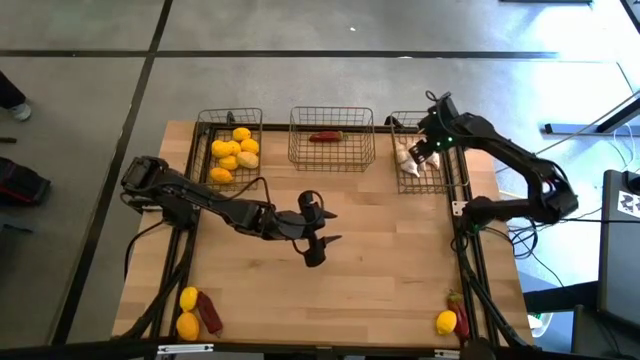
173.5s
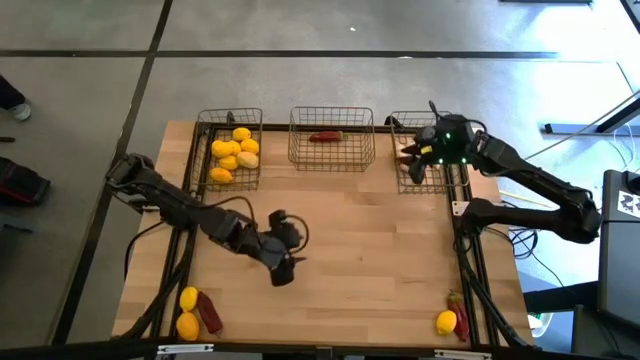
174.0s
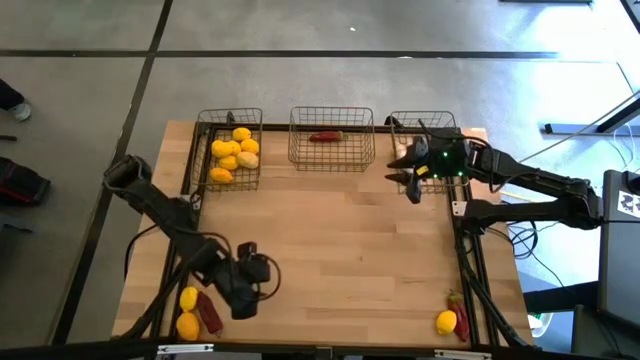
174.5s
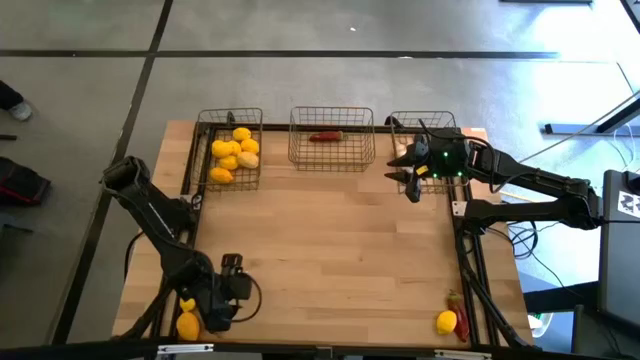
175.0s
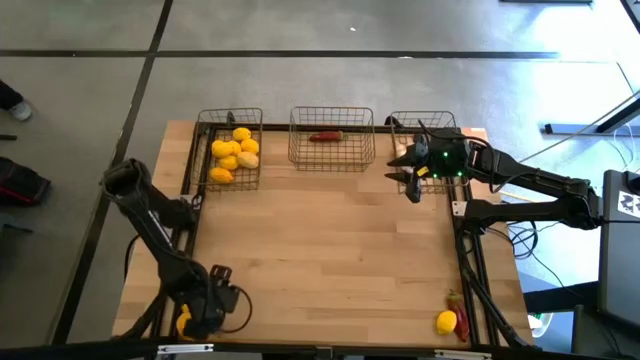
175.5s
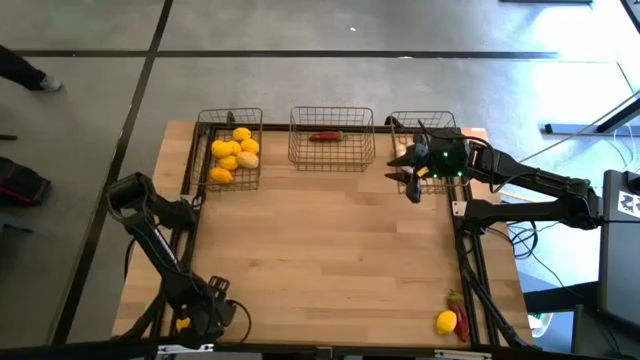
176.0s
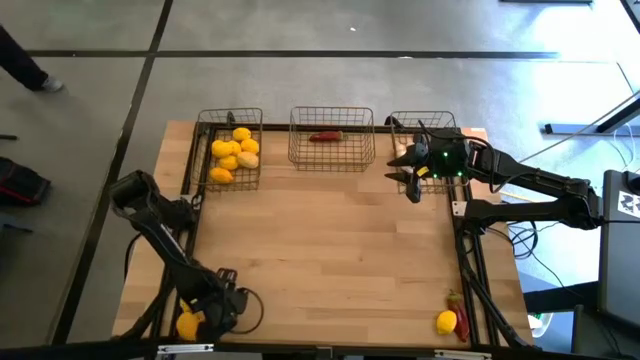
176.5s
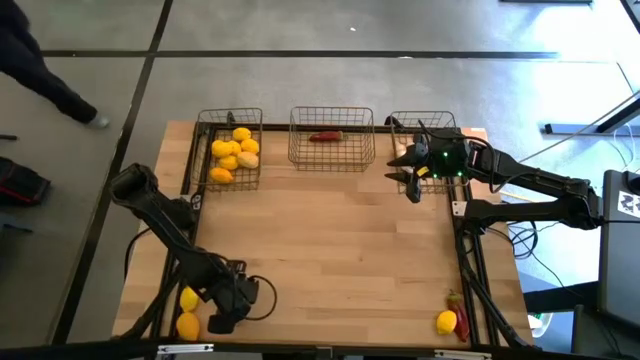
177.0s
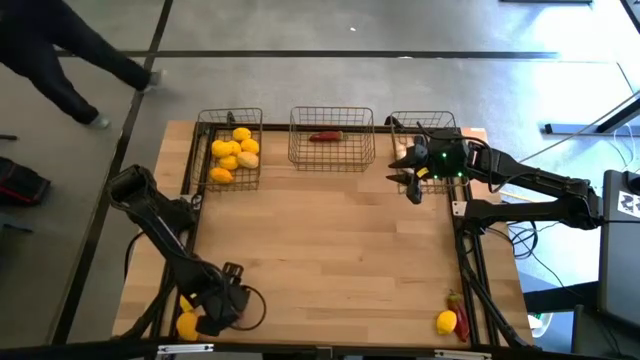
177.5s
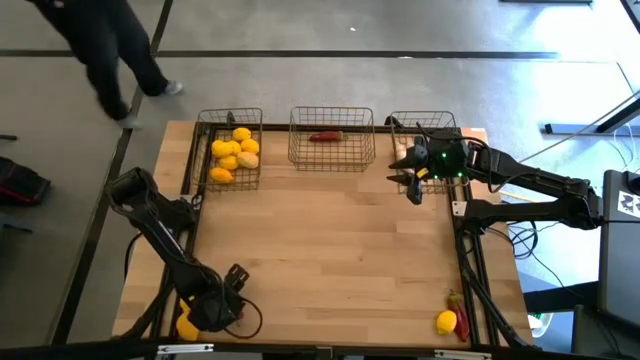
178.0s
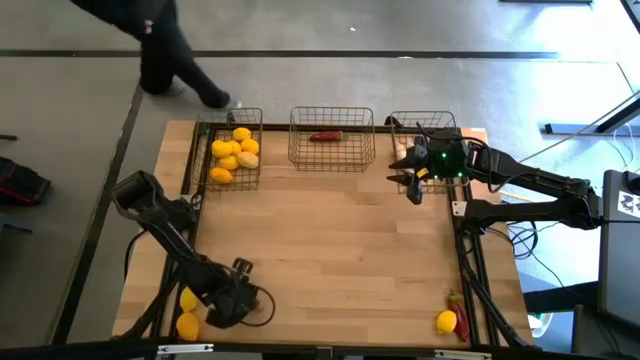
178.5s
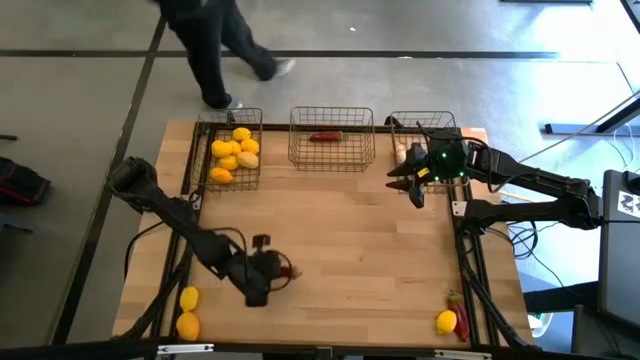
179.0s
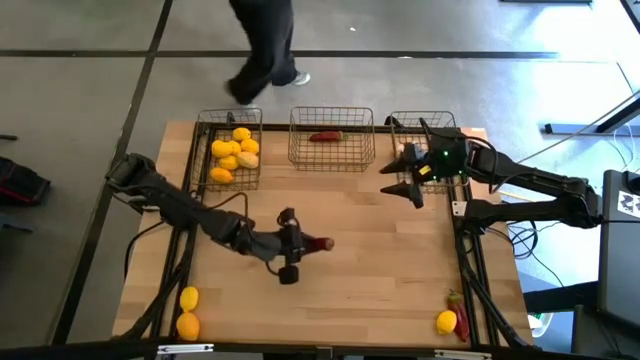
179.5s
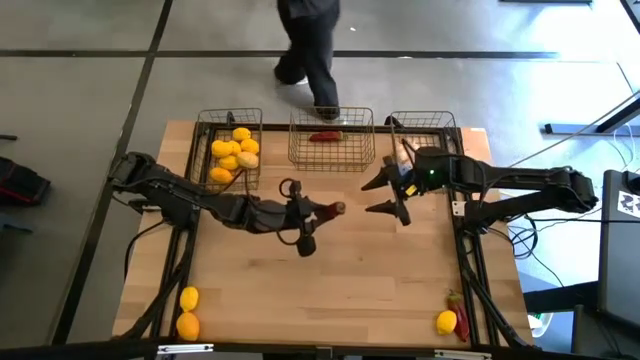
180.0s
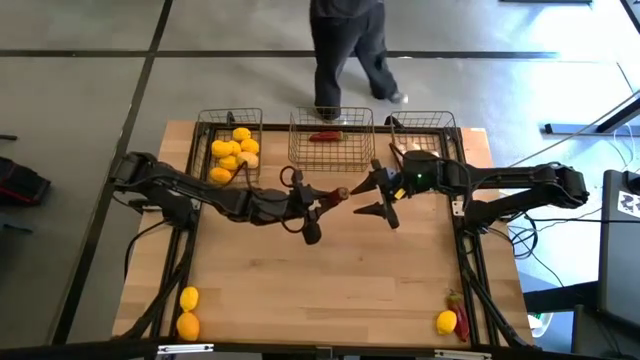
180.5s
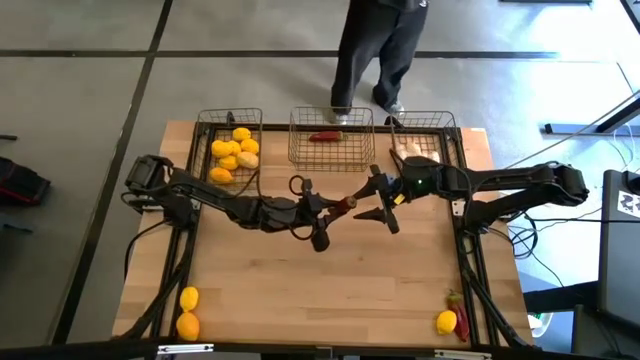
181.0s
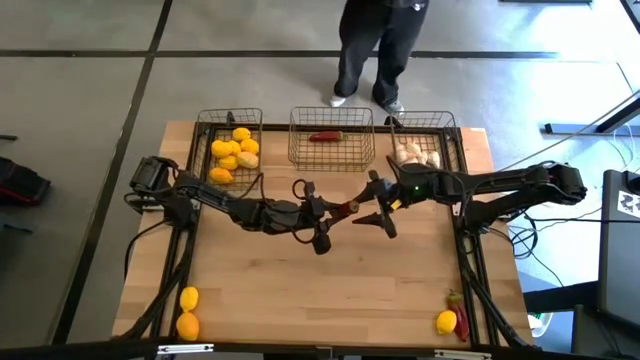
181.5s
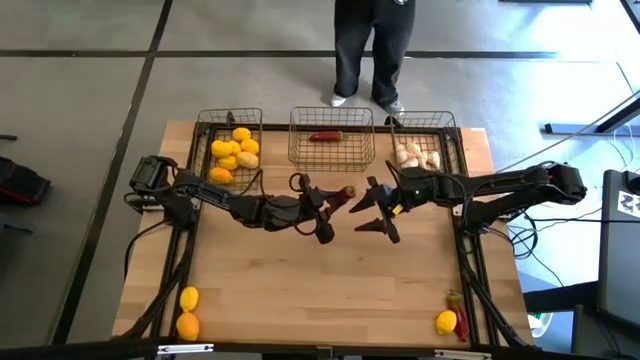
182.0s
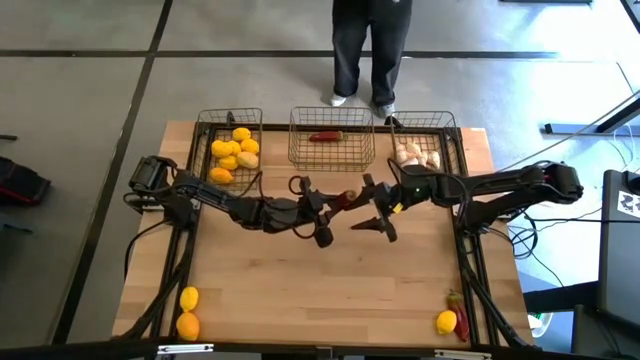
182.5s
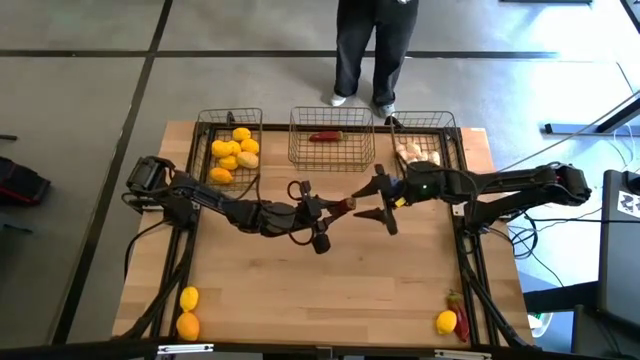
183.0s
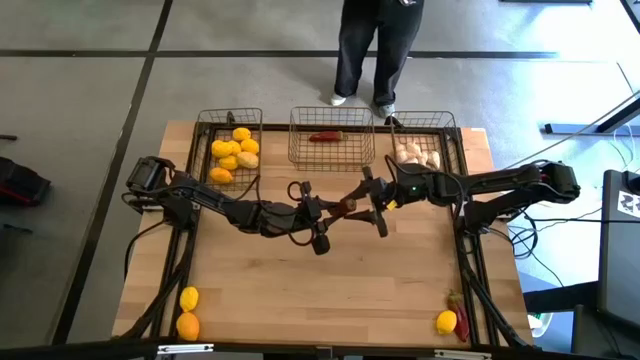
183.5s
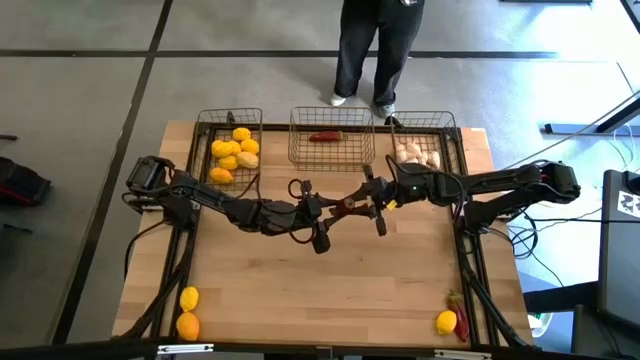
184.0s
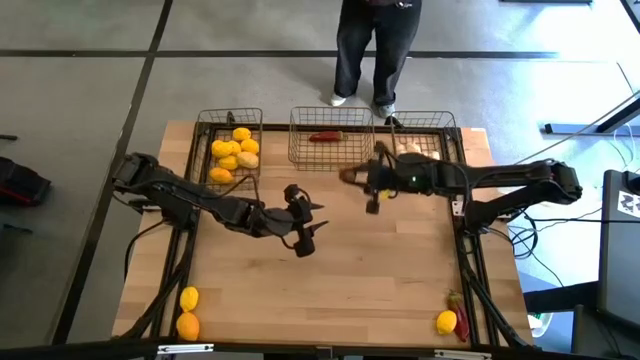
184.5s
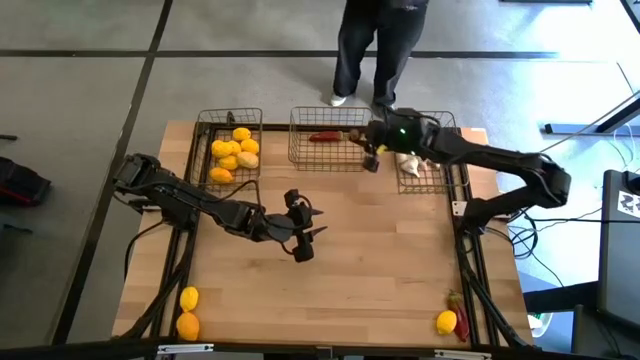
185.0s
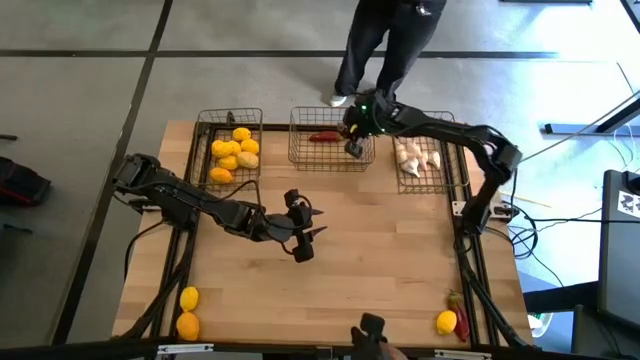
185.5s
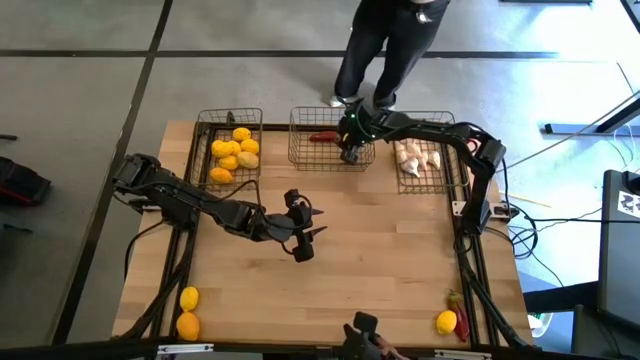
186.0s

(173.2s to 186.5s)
Task: Sort produce into baskets
Put the red chili pepper into the middle gold wire basket

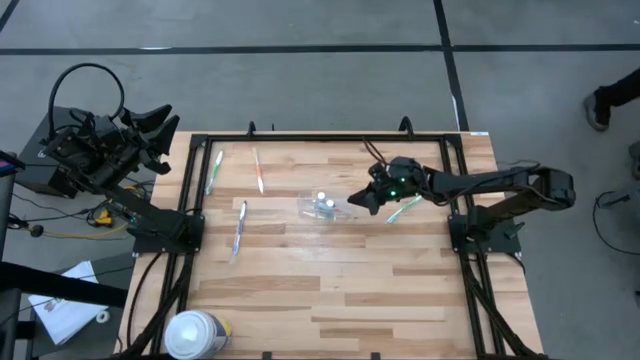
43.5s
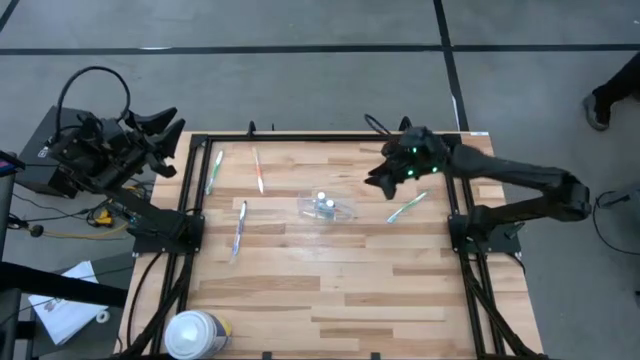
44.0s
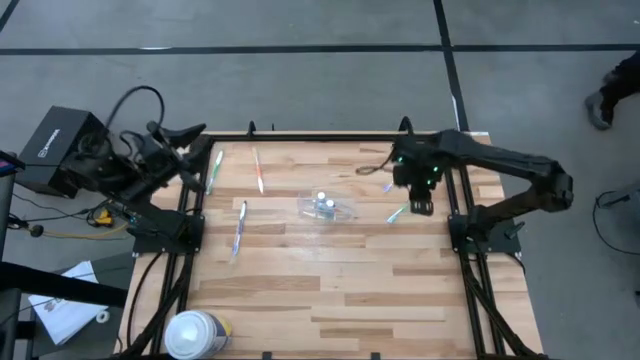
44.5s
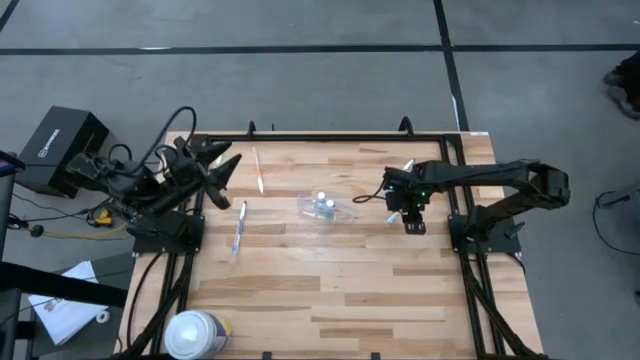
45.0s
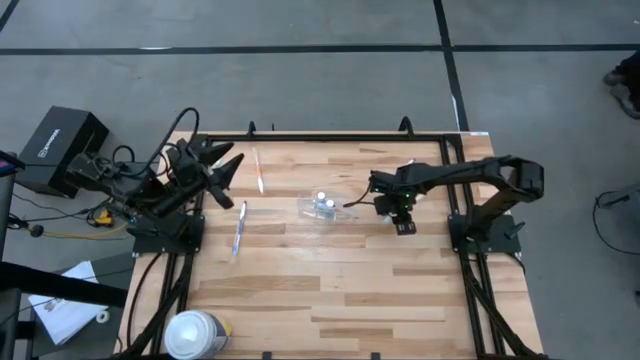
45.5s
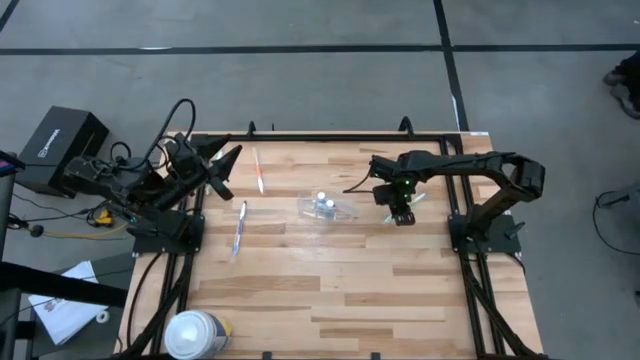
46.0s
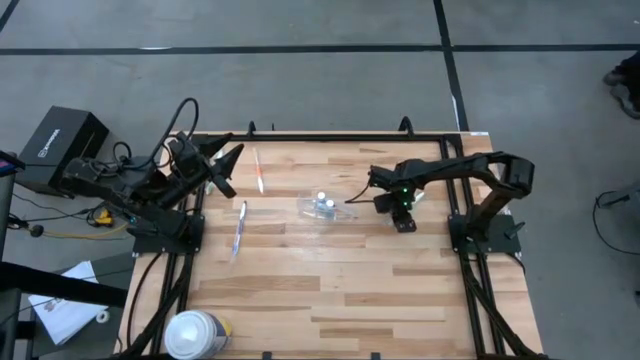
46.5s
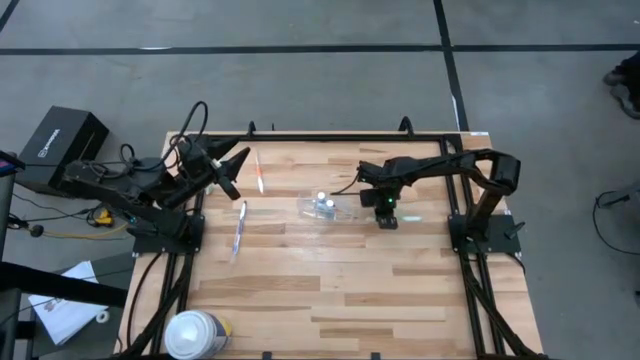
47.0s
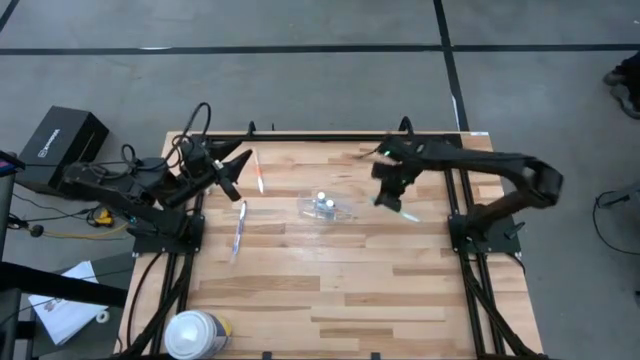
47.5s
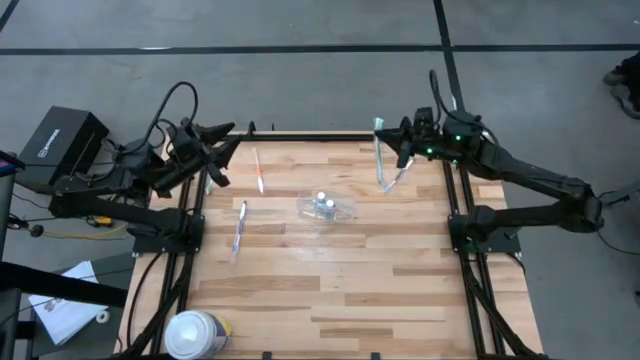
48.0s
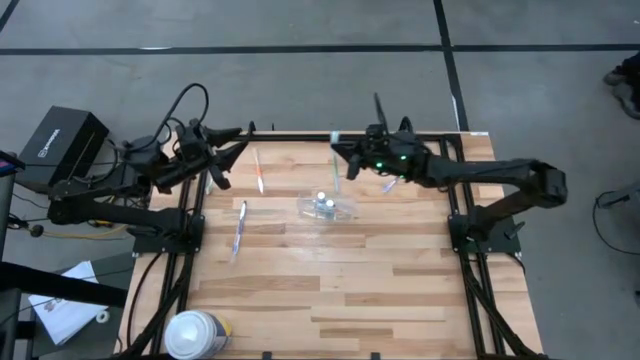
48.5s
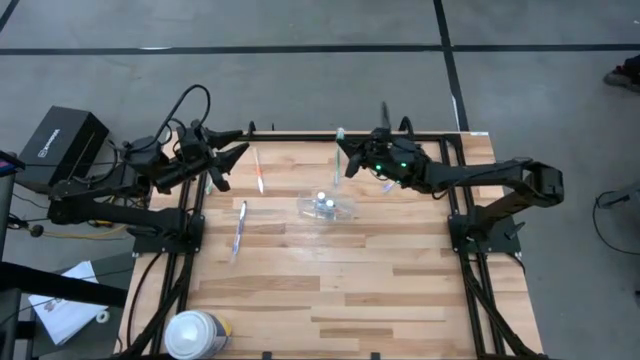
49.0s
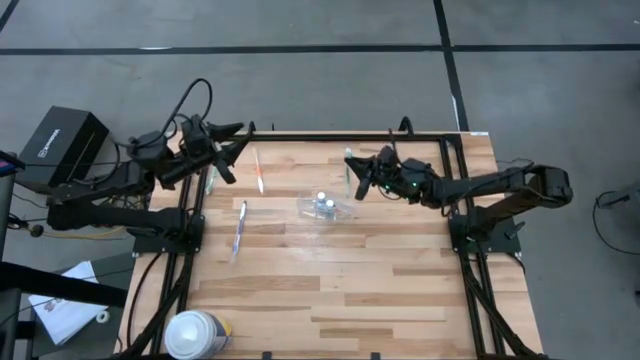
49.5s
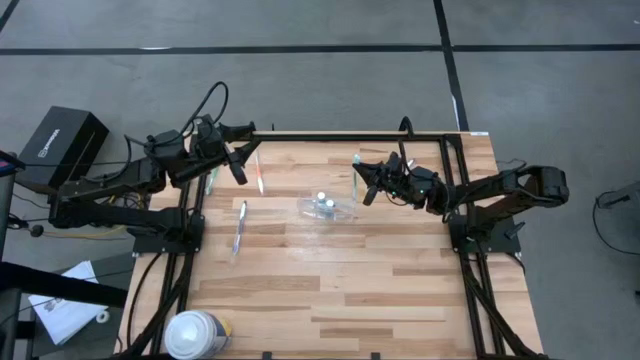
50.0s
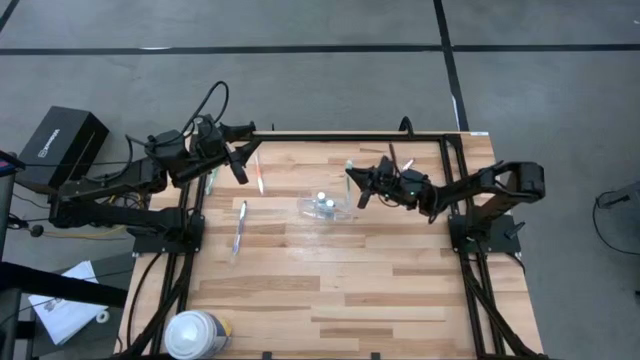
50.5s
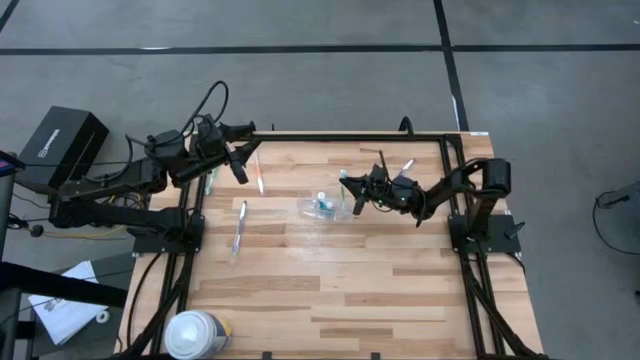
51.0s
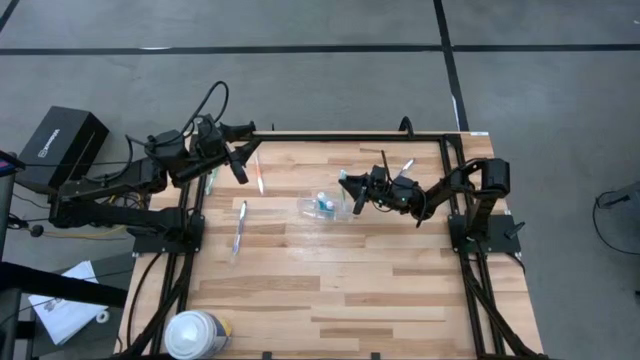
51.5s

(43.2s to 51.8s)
Task: Pick & Place toothbrushing station
Put the right green toothbrush into the transparent organizer
